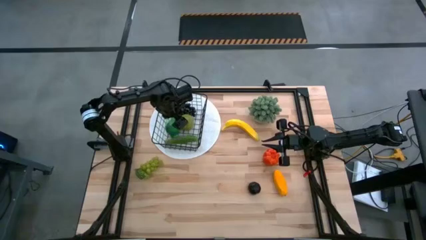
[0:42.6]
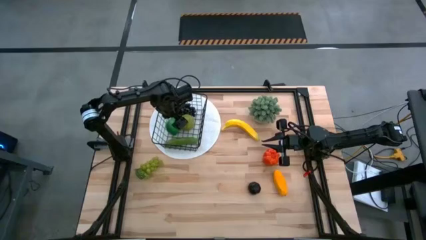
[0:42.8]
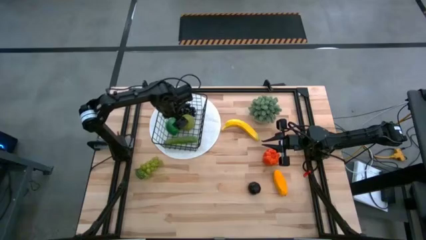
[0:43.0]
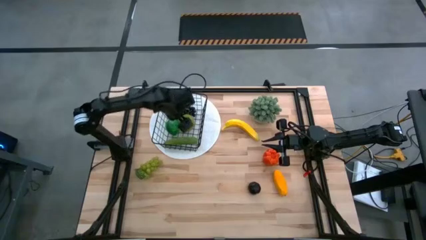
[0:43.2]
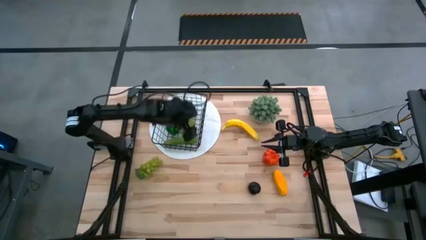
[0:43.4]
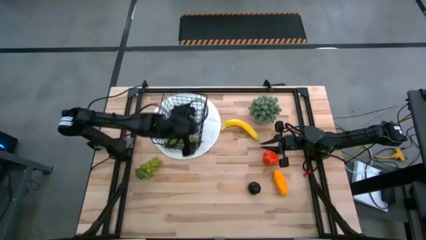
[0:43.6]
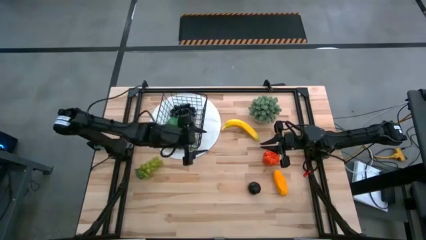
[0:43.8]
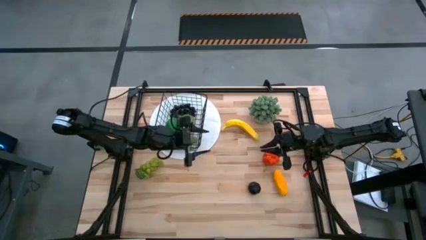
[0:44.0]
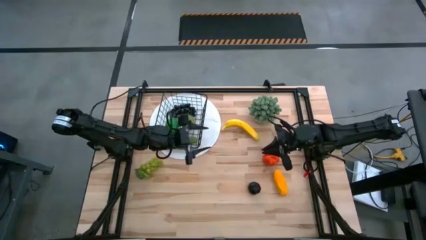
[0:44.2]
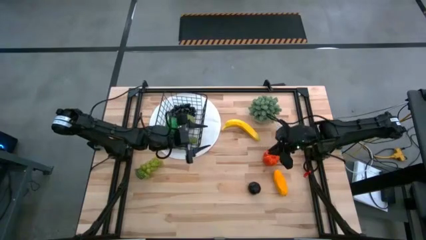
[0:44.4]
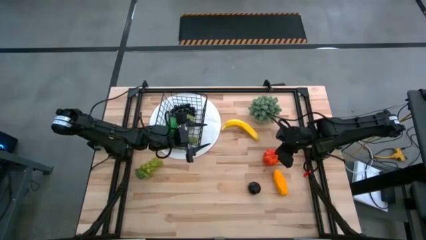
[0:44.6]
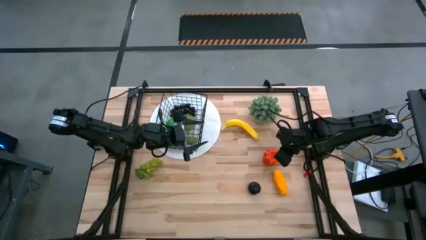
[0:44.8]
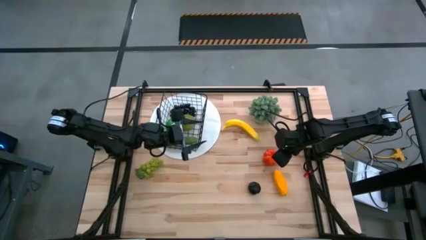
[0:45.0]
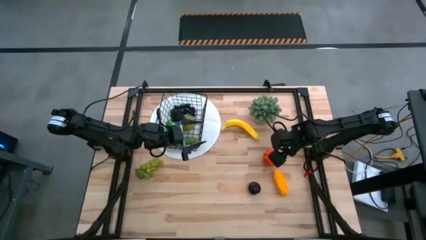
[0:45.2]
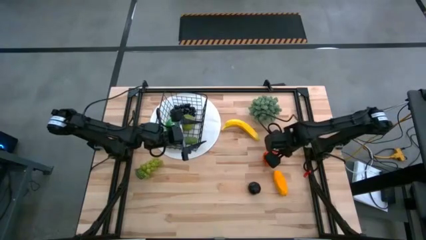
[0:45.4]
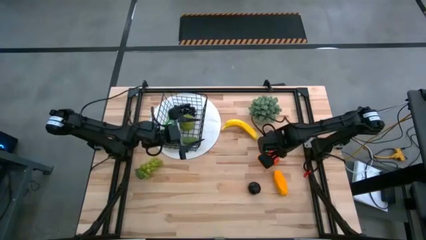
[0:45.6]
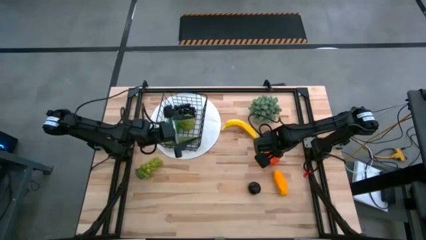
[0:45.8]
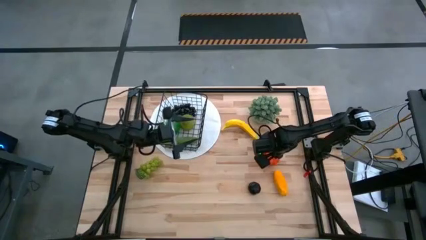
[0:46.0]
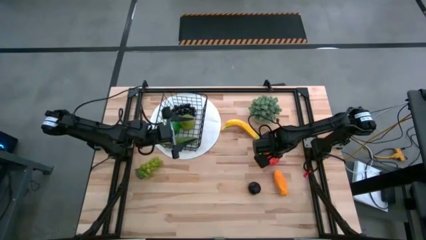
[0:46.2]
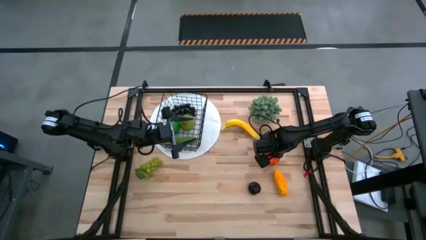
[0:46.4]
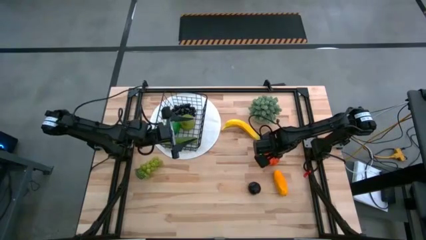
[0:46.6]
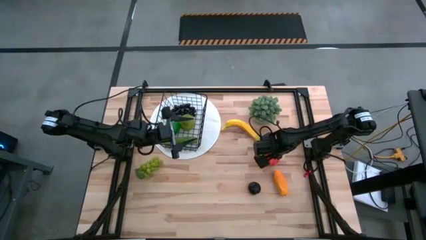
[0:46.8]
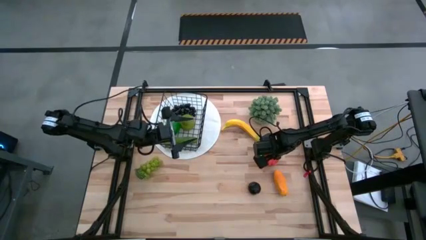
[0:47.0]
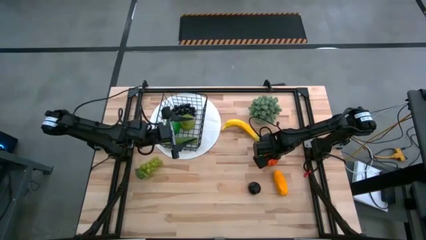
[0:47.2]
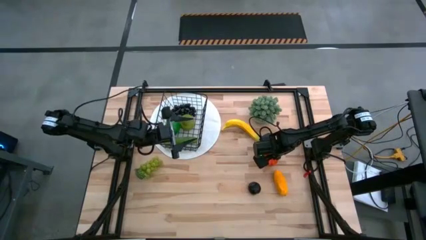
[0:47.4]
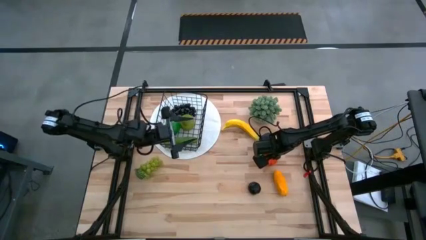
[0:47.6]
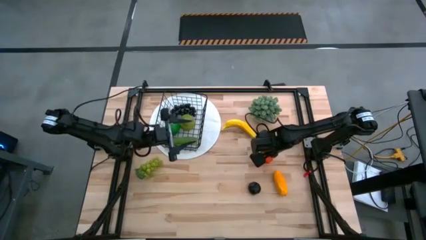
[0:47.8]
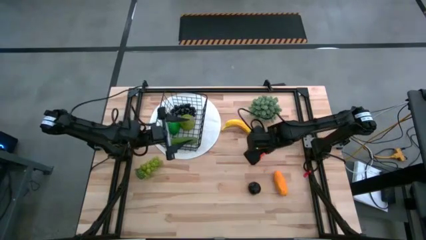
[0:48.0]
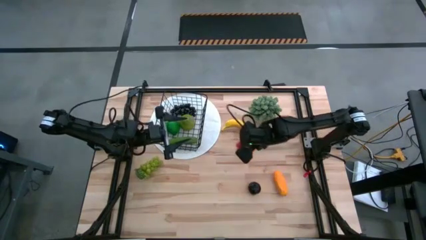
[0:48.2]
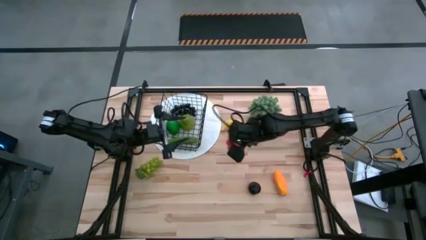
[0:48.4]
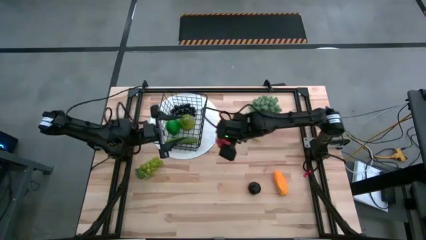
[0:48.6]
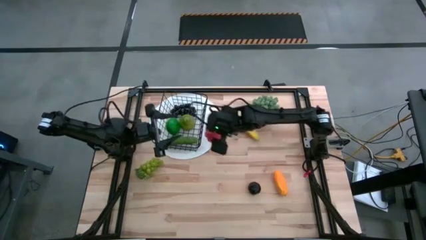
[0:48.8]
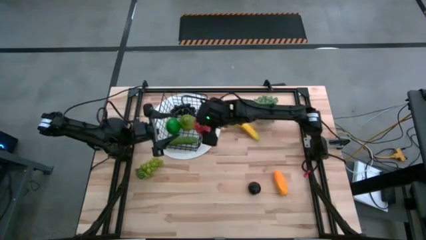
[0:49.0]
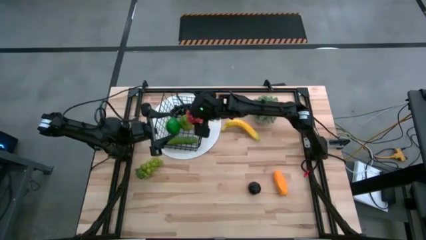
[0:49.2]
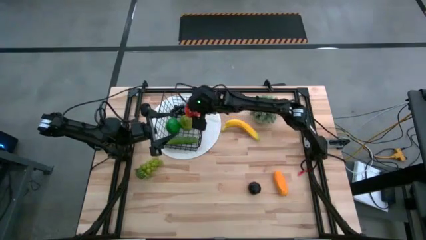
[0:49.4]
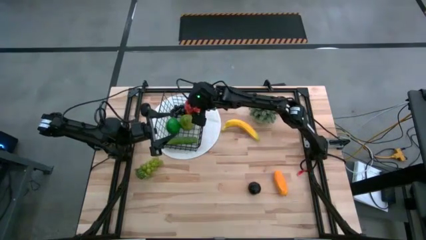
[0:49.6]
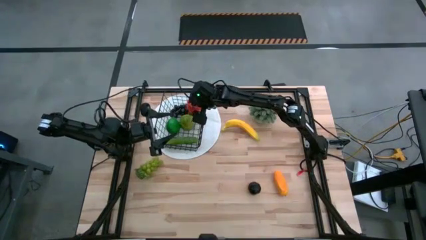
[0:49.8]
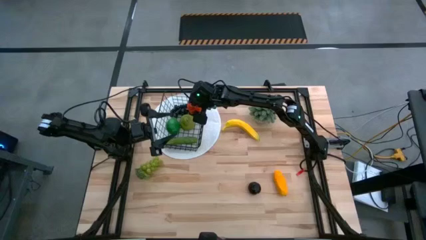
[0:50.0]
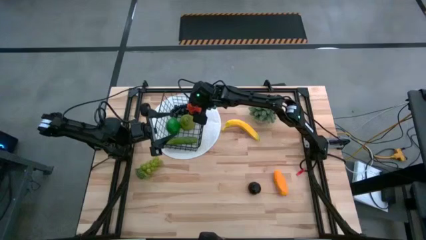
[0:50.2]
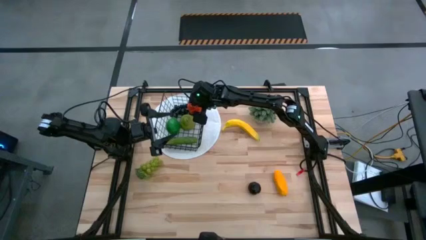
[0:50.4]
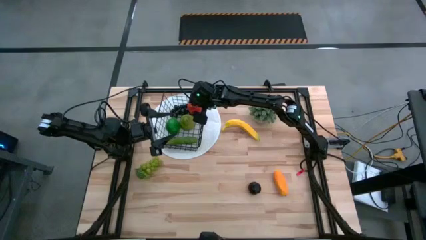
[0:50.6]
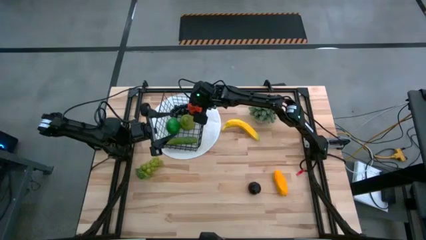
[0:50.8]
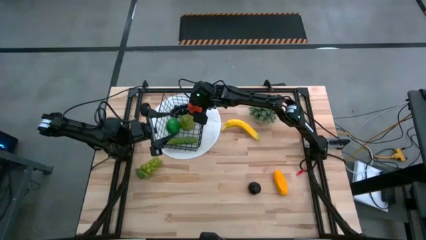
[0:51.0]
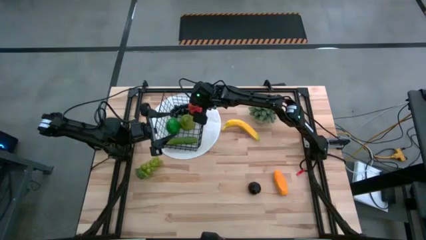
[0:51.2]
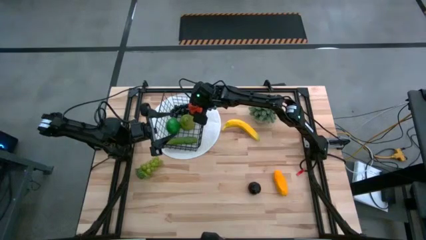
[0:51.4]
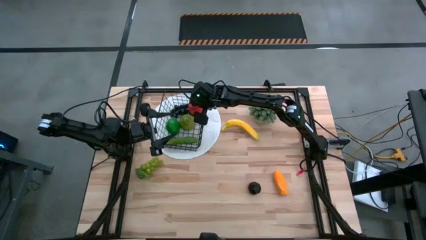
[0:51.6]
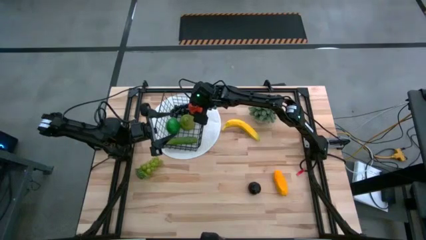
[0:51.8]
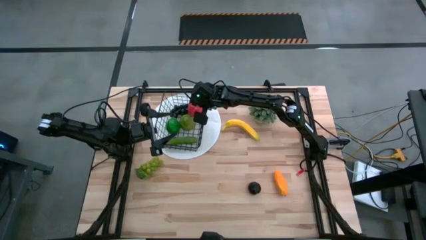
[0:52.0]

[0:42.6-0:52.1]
Task: Build produce basket
Put the orange pumpkin into the wire basket

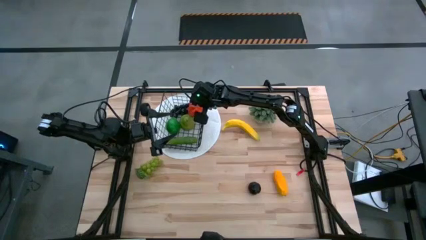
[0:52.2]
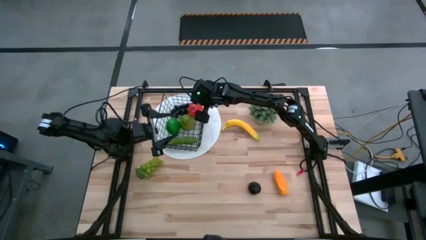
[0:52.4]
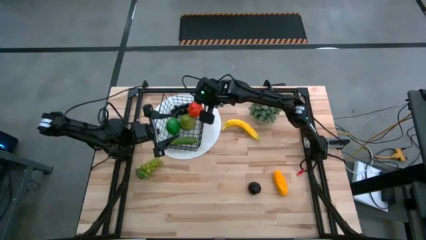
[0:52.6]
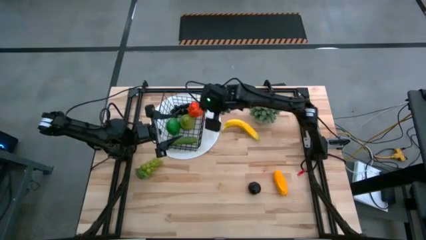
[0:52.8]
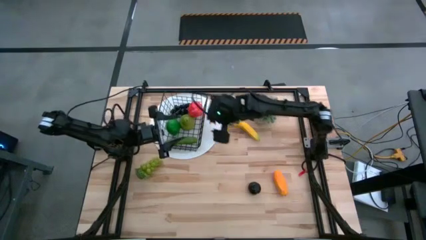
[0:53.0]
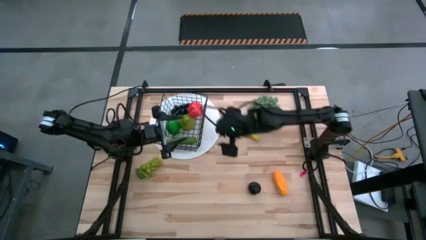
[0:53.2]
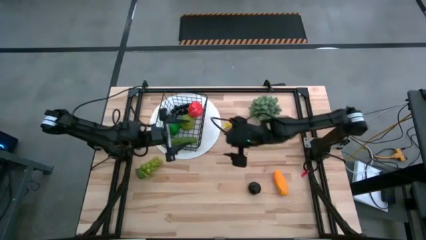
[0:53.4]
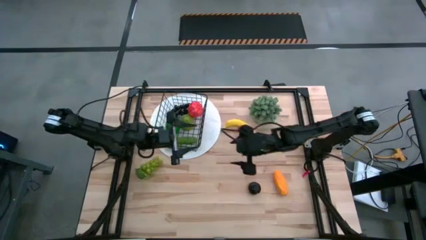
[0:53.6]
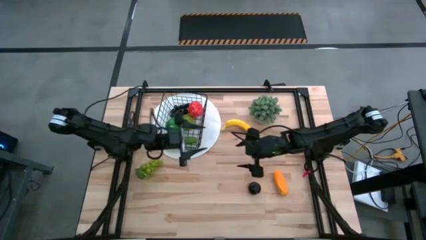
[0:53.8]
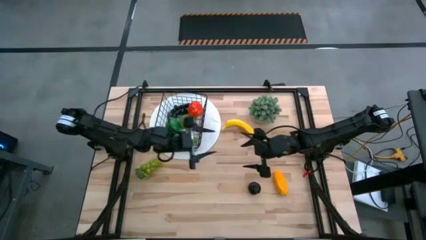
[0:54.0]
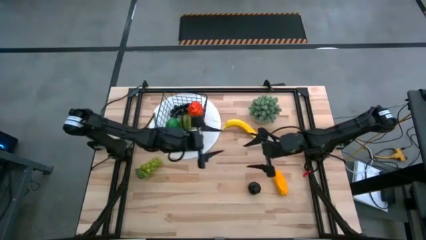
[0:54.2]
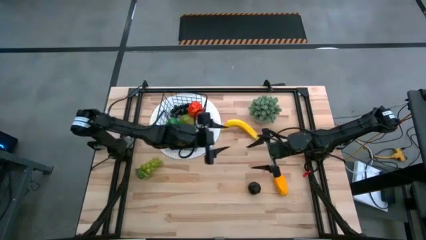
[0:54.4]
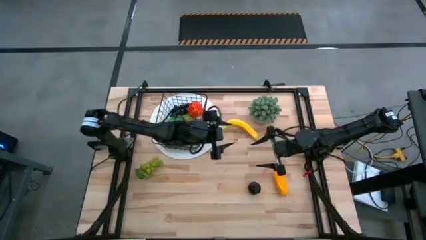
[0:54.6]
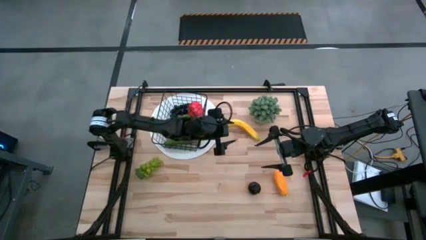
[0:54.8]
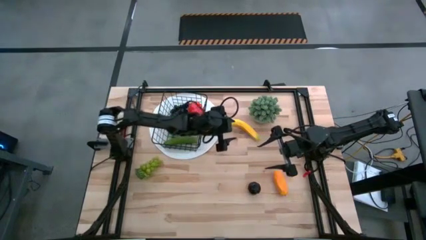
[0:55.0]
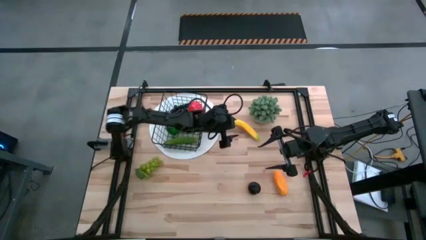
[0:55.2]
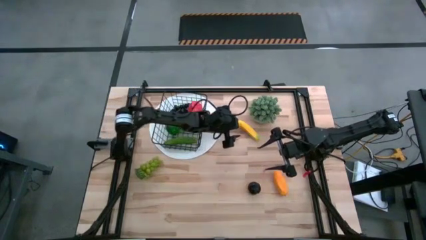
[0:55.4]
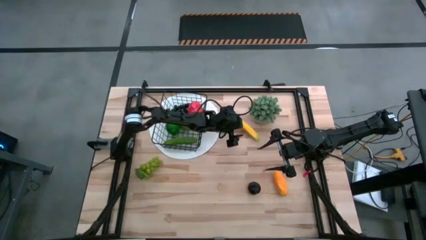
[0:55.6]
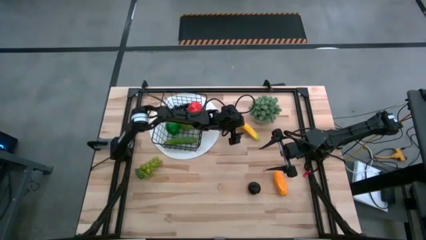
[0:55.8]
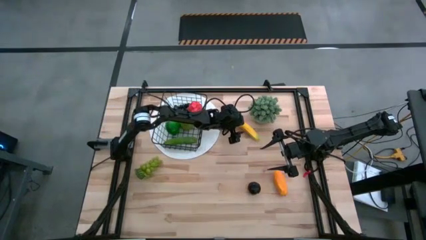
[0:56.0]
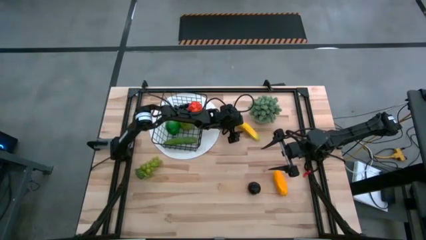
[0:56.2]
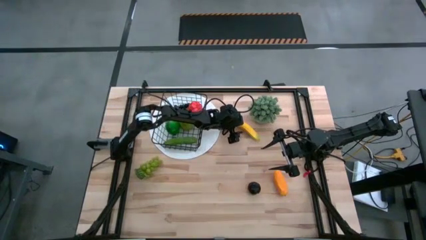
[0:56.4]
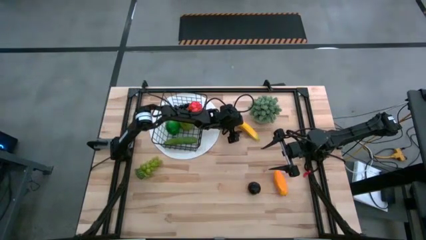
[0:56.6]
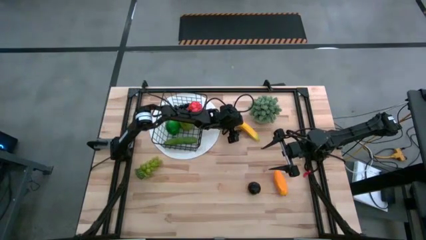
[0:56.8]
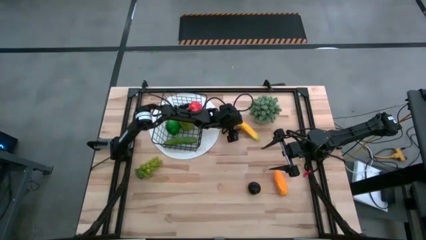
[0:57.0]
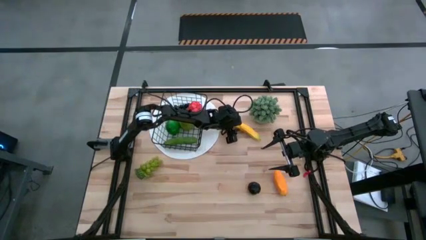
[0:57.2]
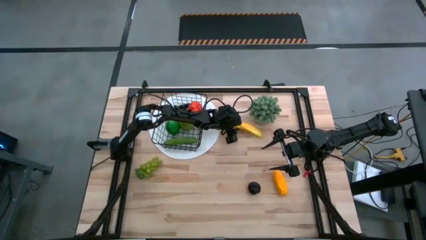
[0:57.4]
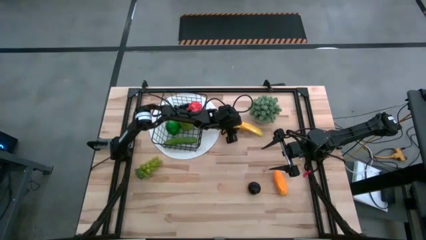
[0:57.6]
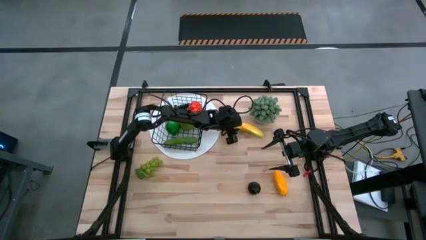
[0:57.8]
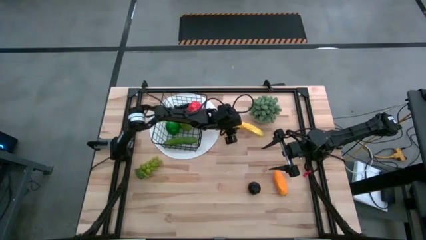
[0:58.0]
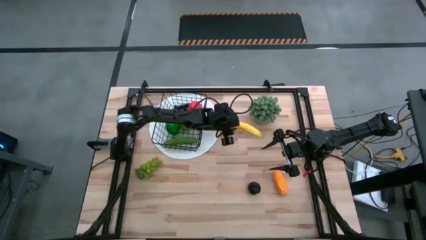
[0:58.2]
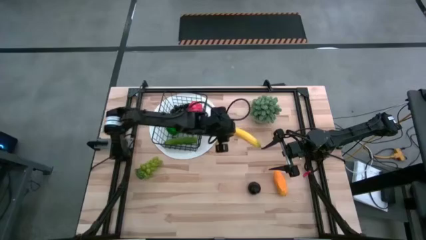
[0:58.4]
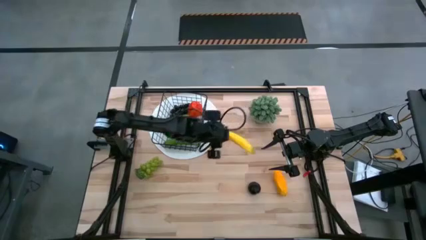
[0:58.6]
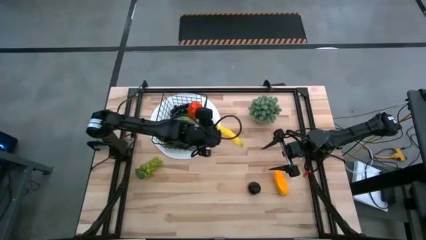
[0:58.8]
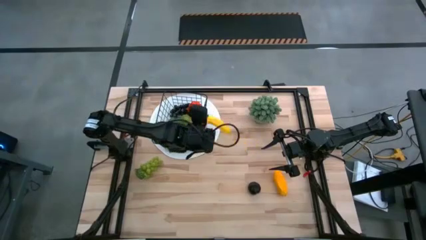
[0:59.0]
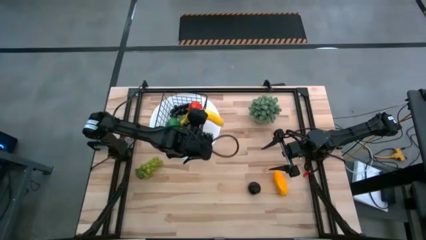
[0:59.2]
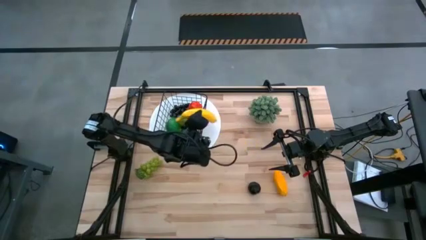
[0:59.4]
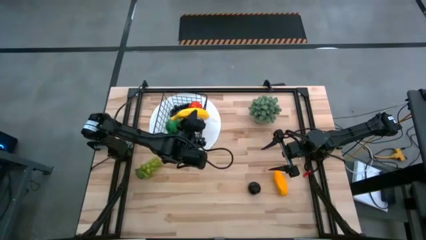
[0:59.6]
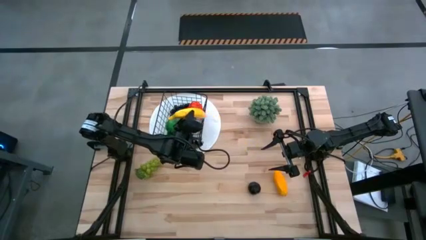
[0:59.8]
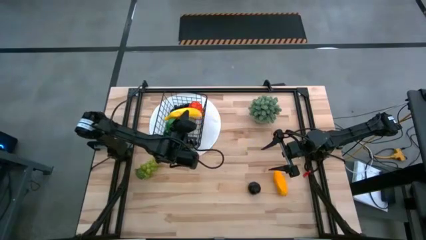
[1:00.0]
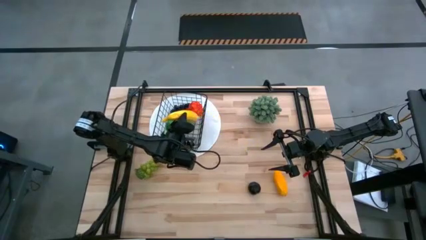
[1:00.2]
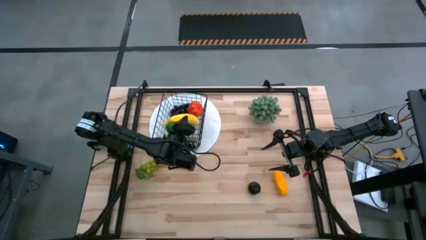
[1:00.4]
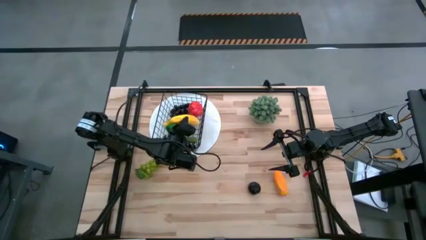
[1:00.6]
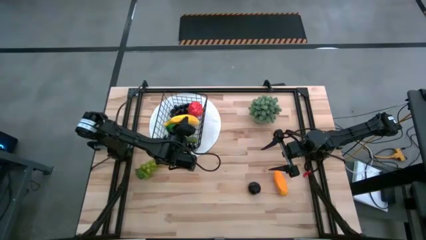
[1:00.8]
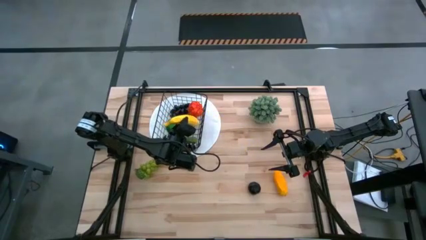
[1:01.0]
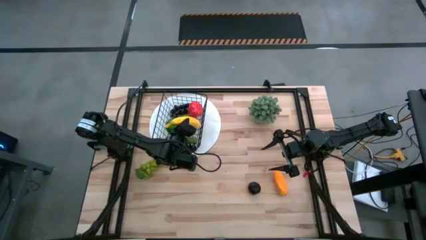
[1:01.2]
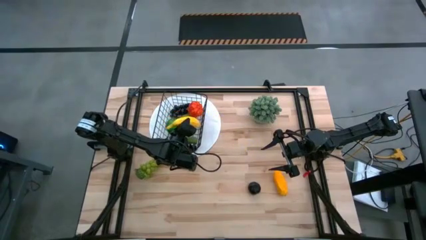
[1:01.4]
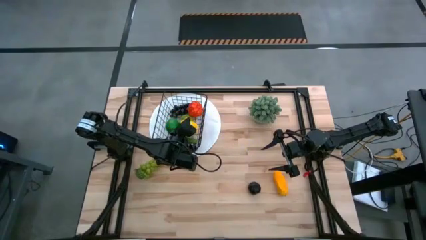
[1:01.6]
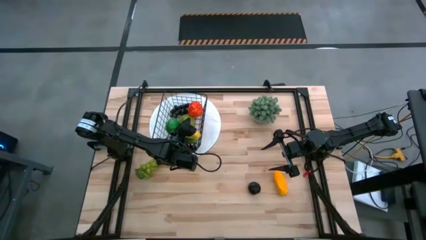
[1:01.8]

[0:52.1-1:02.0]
Put the yellow banana into the wire basket
